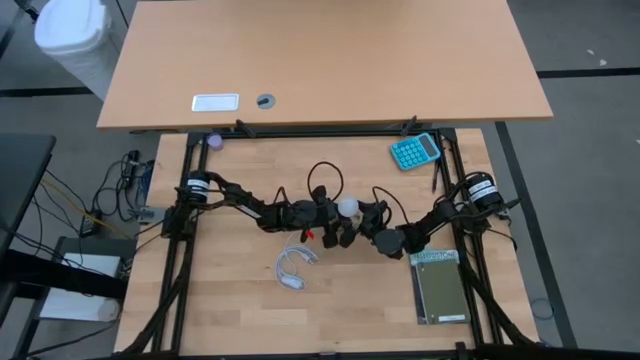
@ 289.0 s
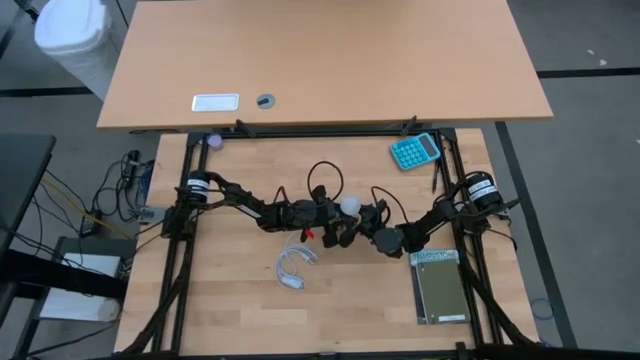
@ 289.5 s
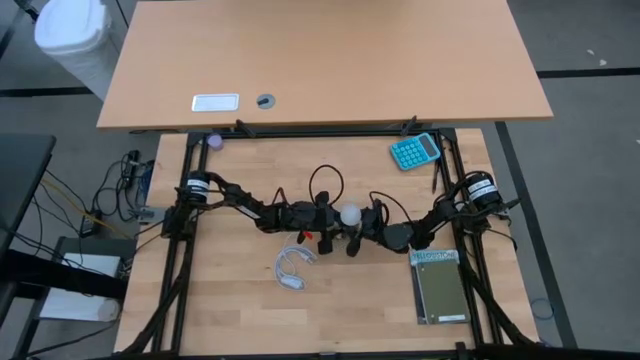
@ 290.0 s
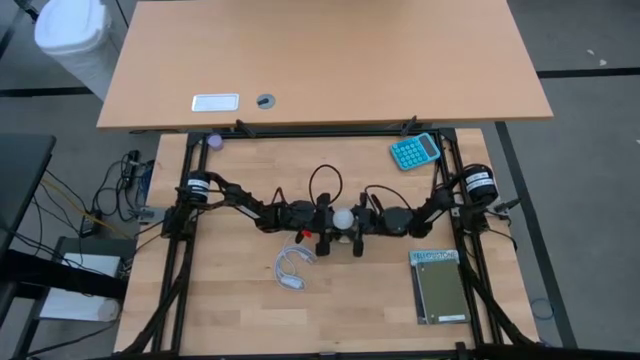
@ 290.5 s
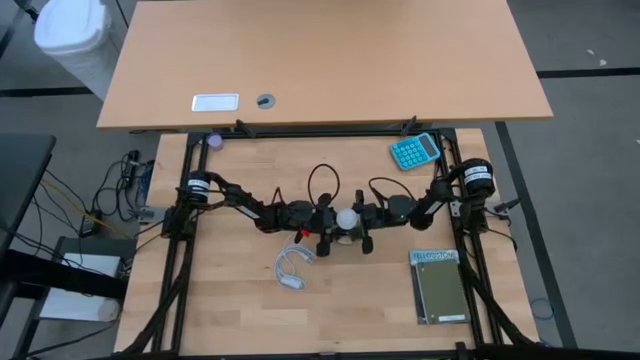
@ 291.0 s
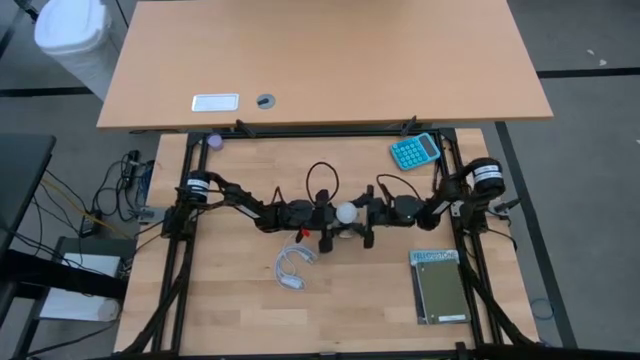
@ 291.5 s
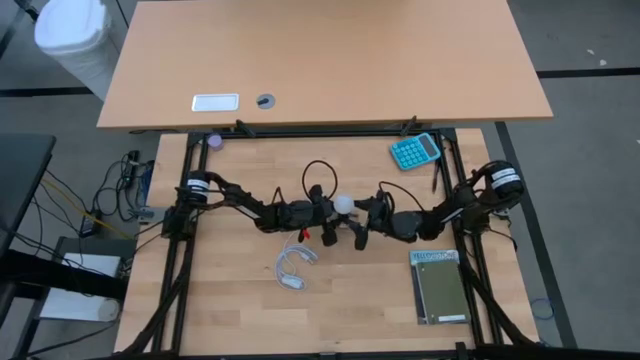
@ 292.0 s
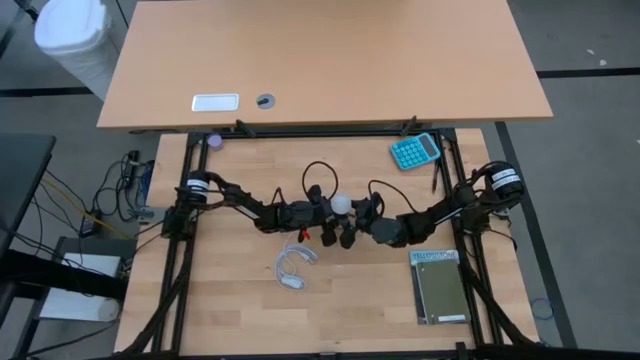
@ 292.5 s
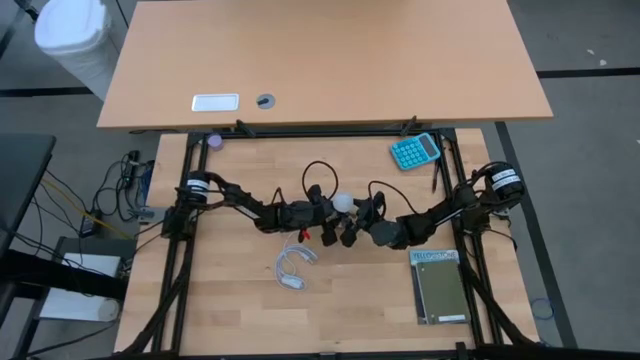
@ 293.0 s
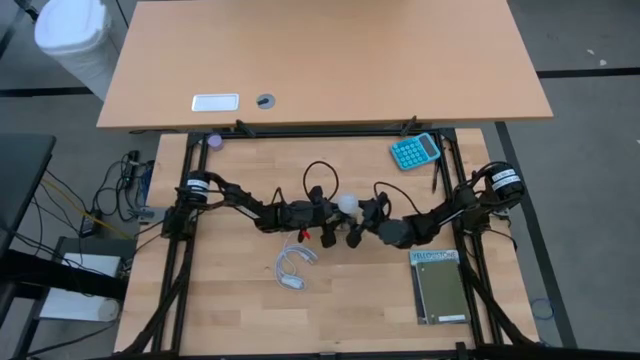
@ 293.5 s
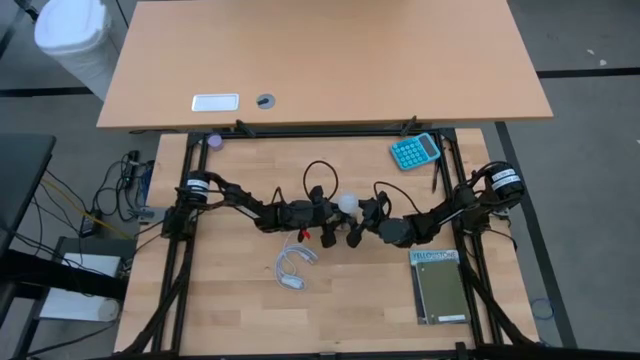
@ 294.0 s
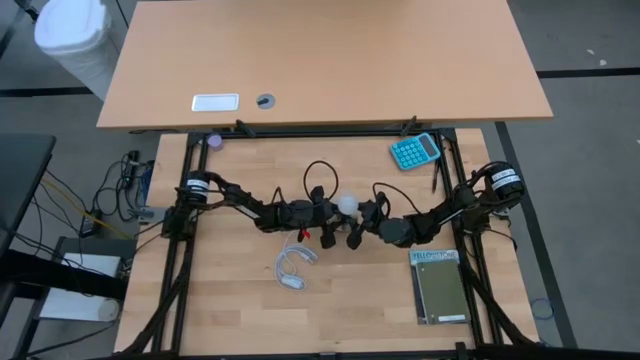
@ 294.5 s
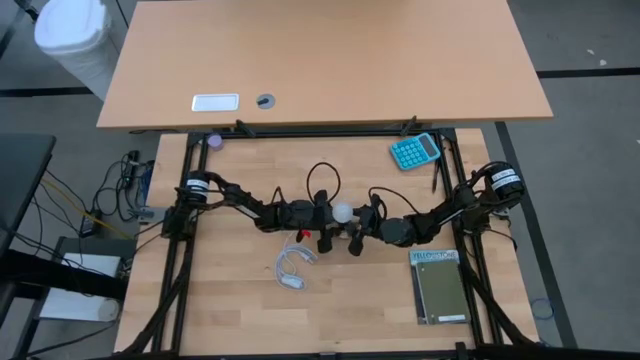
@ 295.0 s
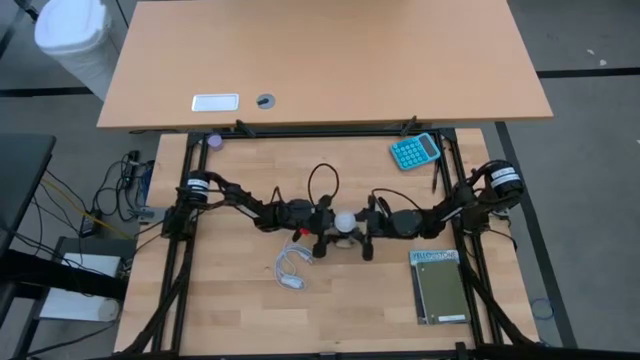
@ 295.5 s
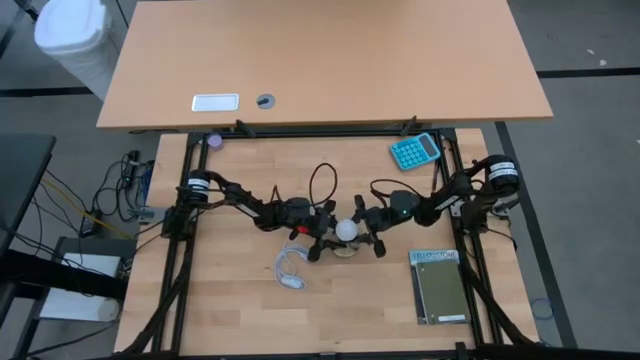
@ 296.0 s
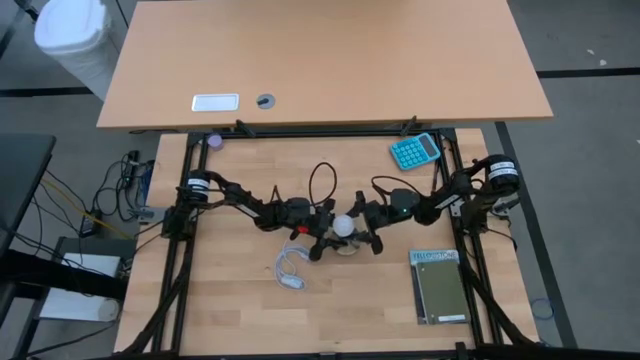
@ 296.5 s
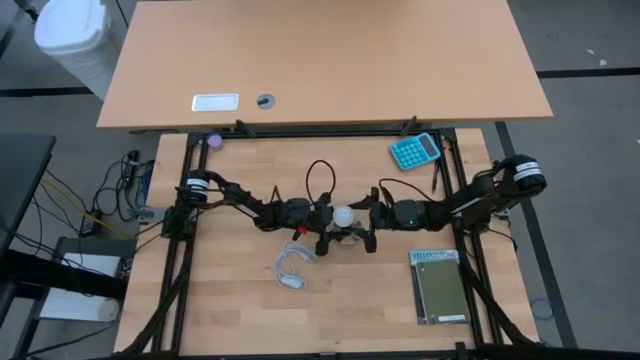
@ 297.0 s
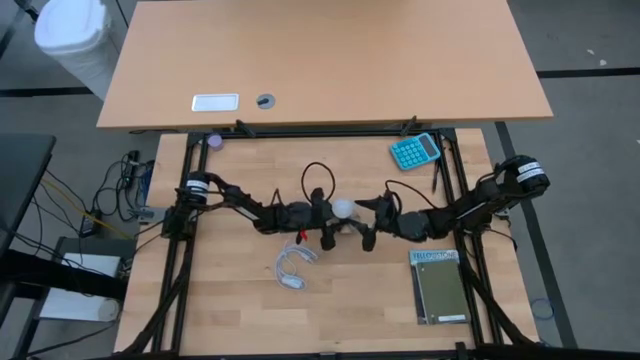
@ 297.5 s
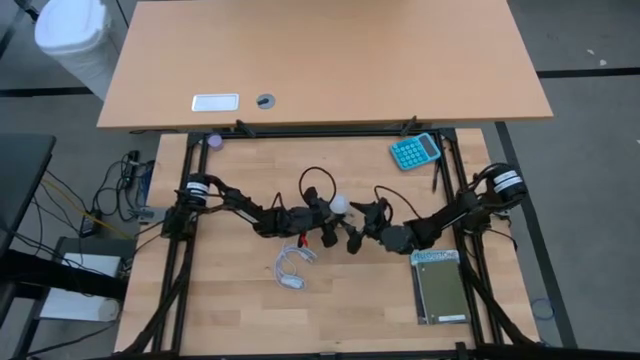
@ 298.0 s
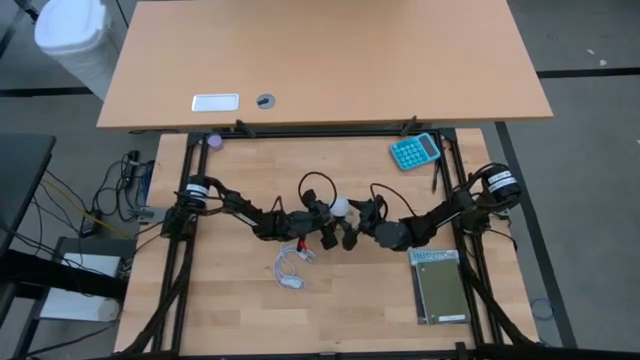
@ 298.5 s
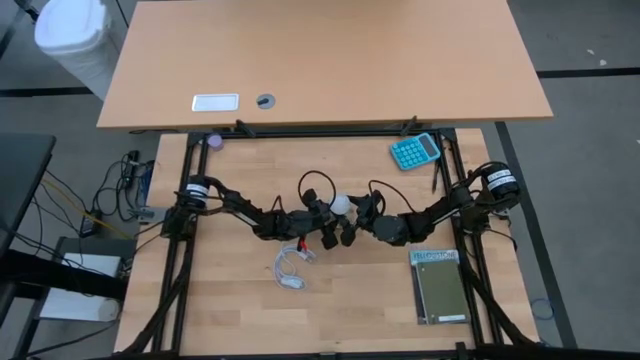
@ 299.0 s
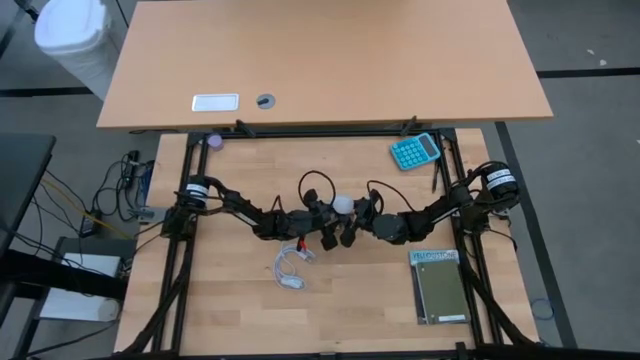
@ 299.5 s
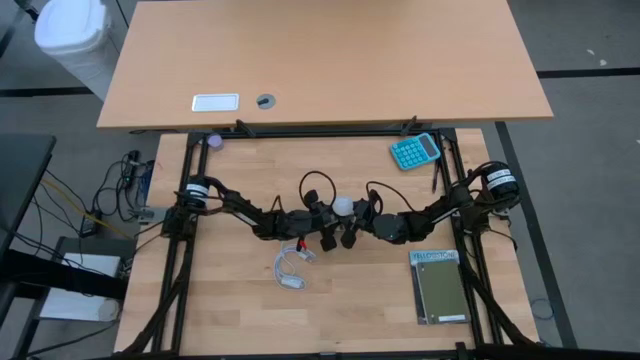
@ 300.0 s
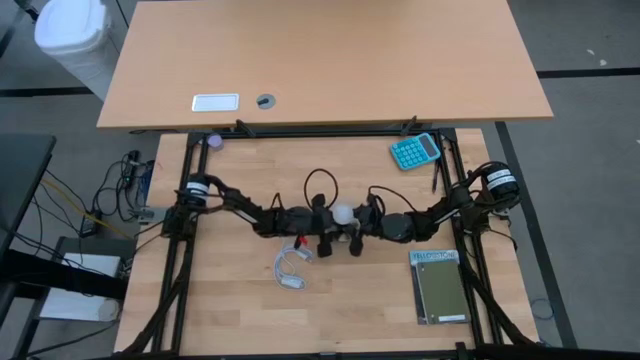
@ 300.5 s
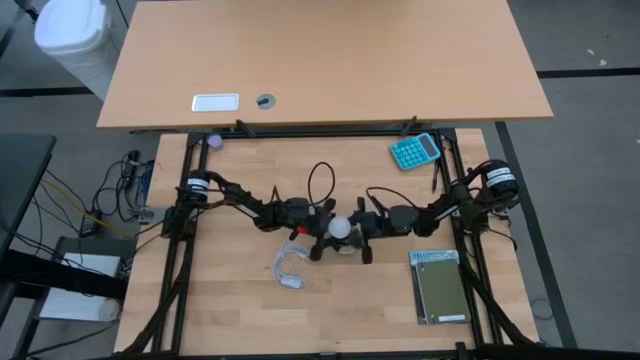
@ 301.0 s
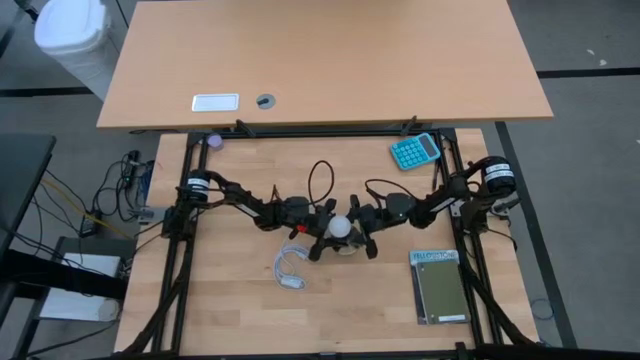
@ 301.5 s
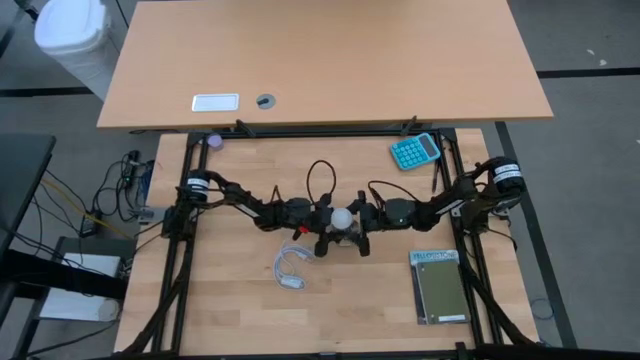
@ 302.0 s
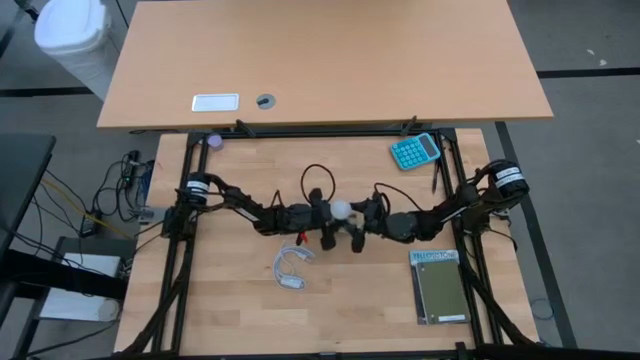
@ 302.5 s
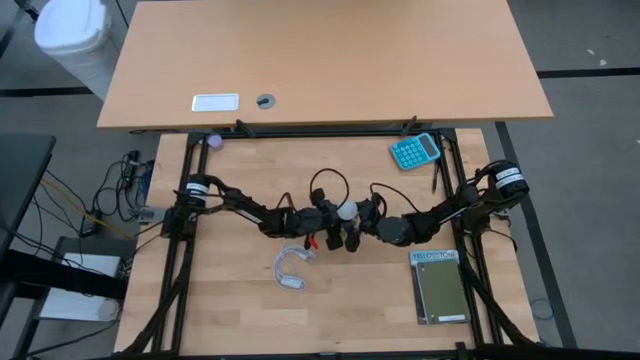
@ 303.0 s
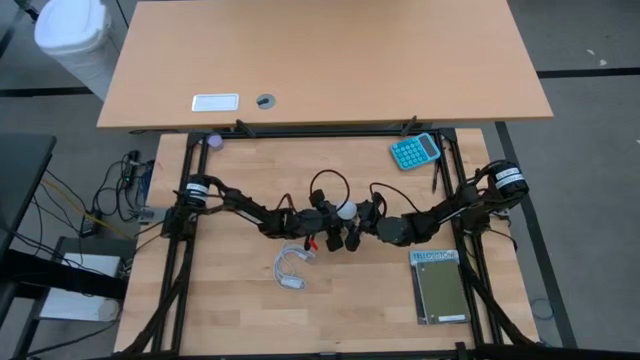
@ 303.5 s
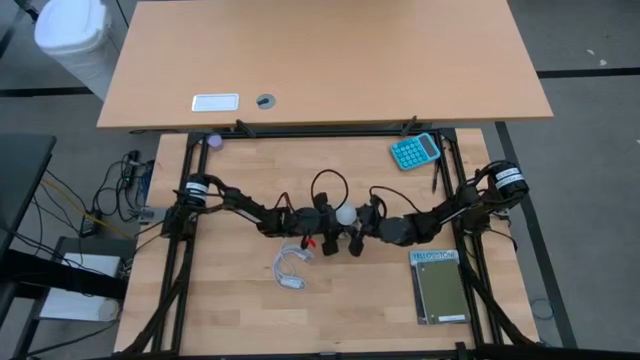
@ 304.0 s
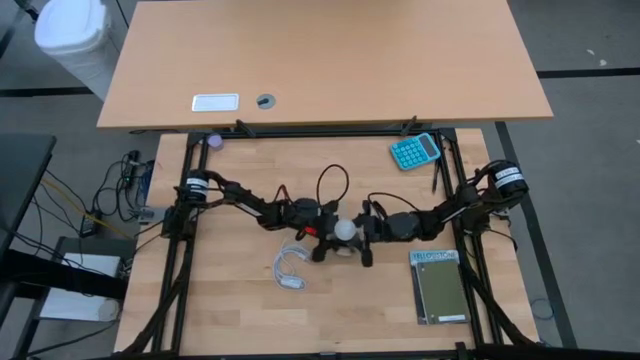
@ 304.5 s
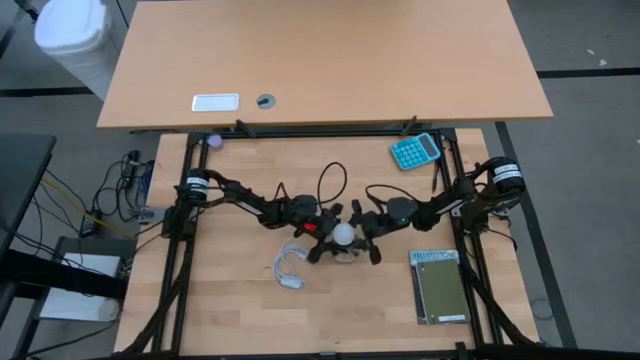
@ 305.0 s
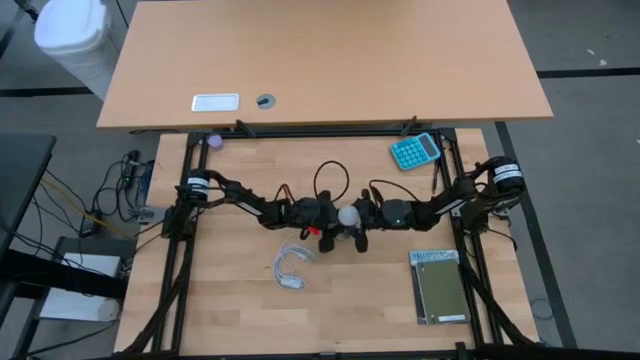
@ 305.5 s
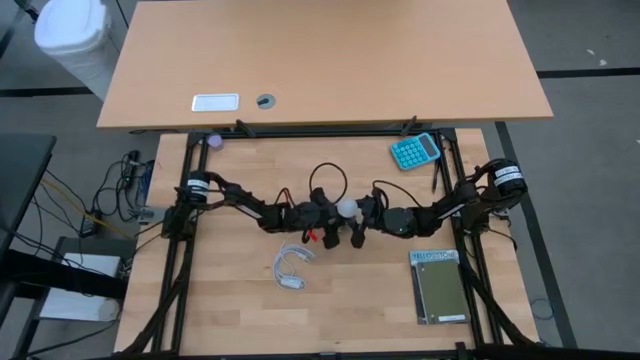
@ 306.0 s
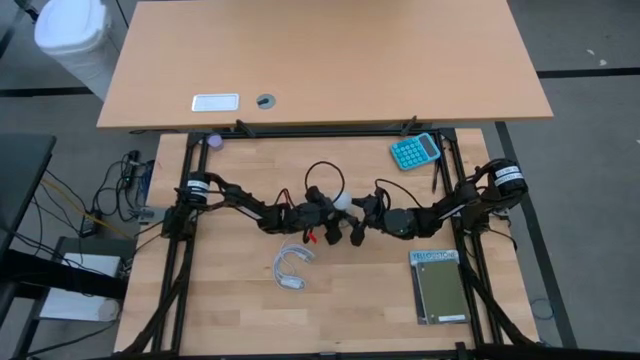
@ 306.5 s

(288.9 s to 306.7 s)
Task: Screw lightbulb
Remove the lightbulb from the socket
